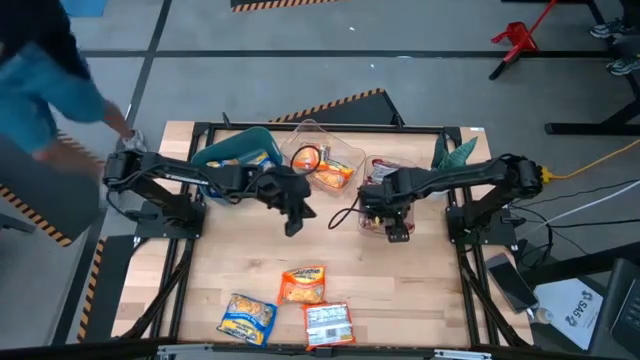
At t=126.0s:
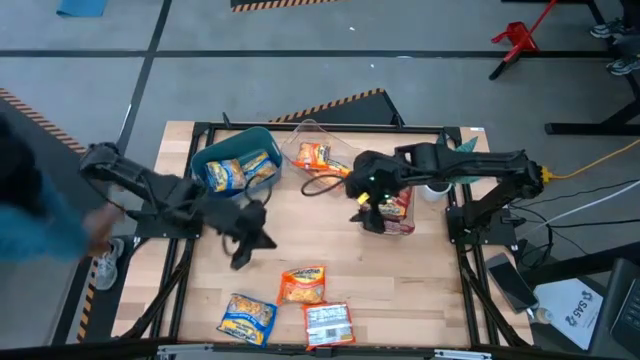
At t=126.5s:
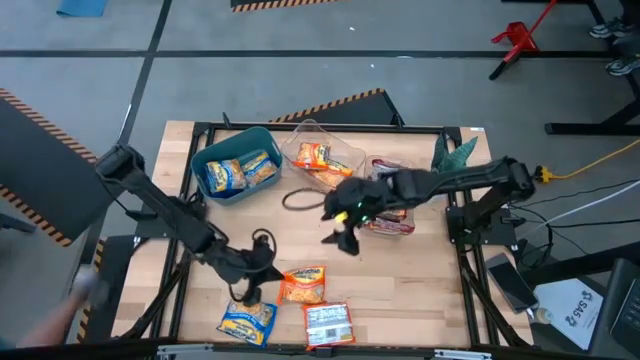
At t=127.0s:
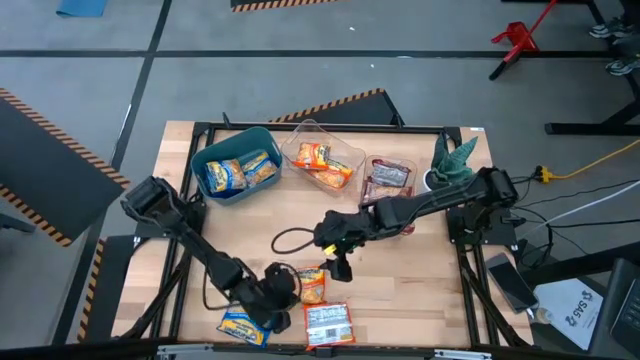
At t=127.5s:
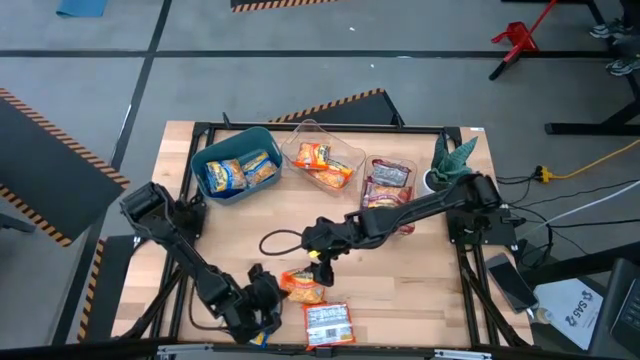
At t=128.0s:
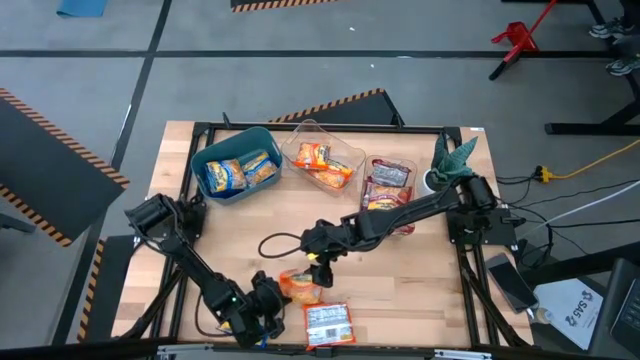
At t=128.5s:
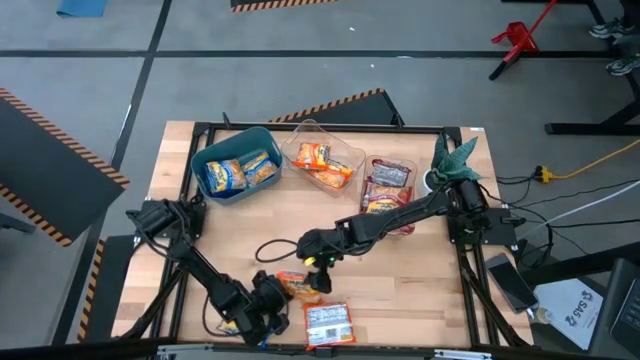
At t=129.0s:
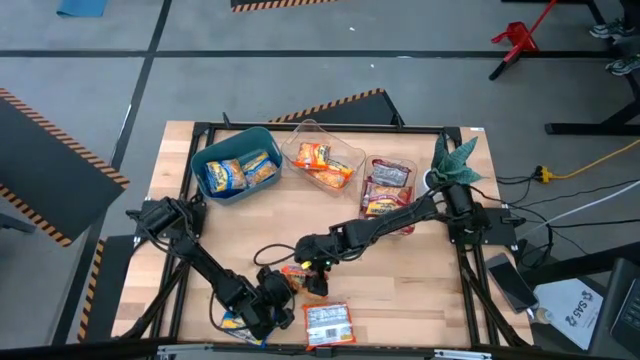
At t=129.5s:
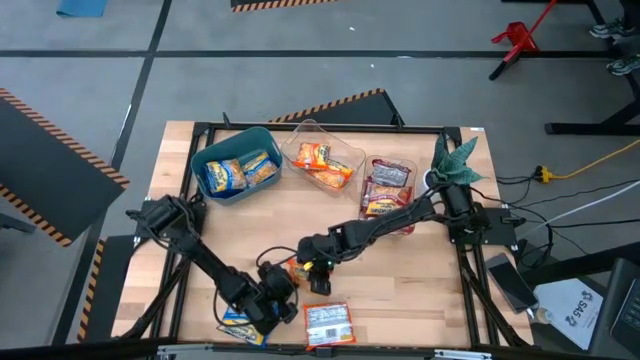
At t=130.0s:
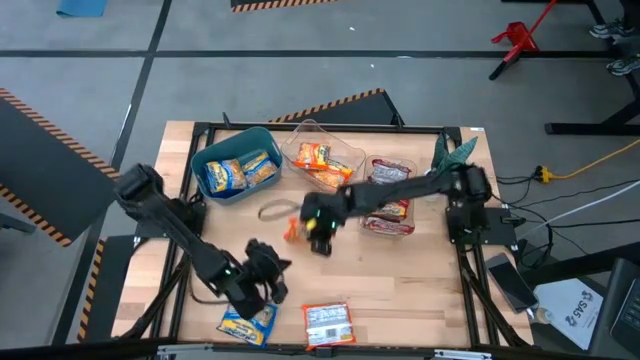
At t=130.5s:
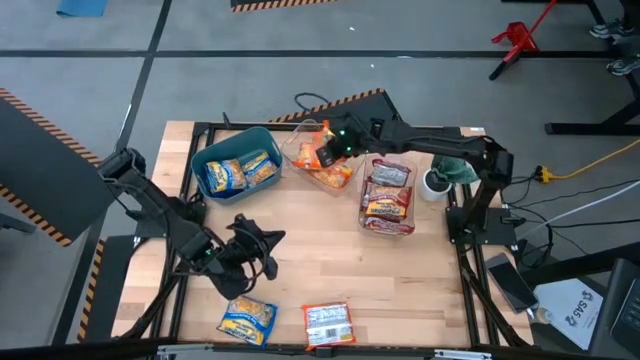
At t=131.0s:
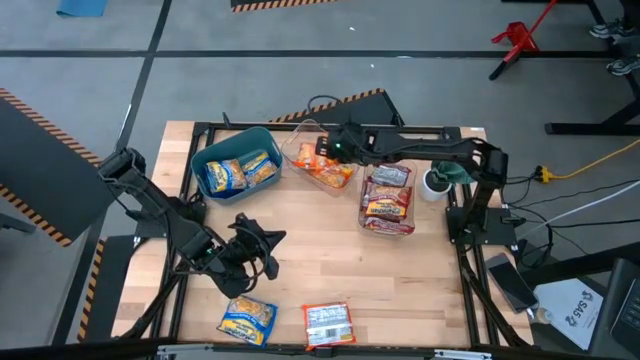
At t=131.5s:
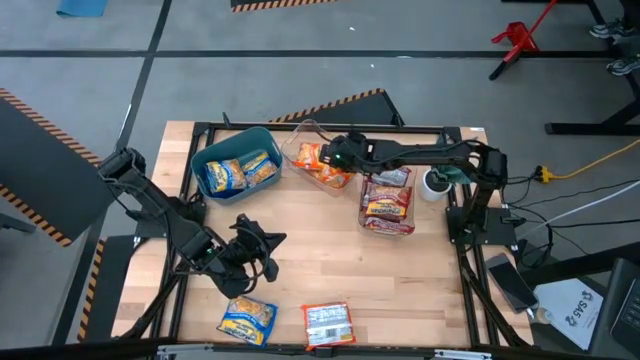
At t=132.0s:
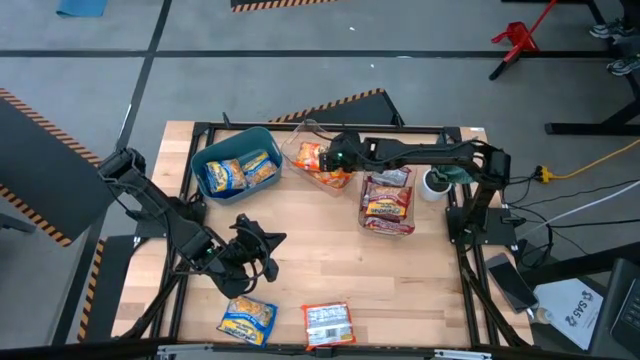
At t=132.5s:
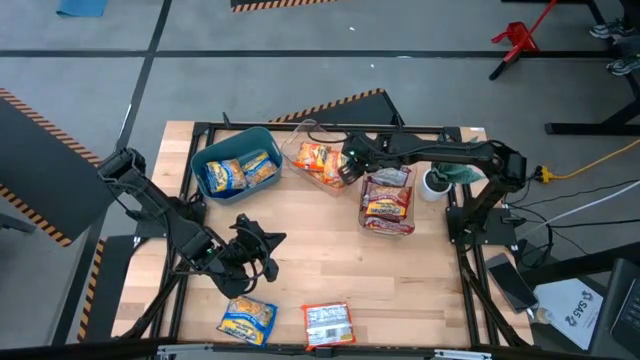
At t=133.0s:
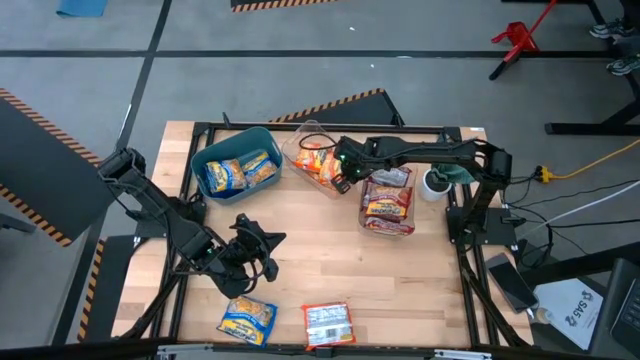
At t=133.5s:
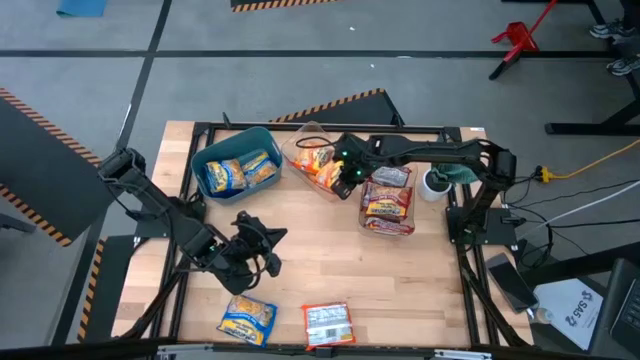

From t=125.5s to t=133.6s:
Task: Sort Maruchan noodles
Put the orange noodle pack into the left transparent bin

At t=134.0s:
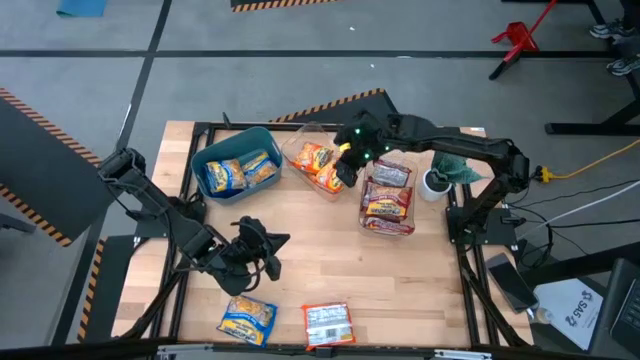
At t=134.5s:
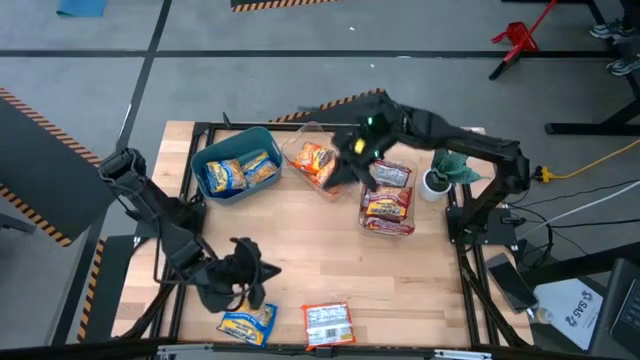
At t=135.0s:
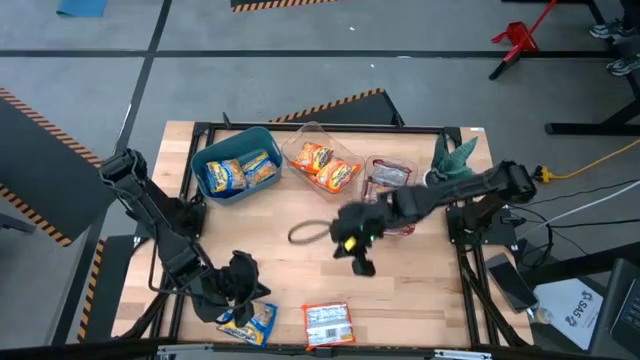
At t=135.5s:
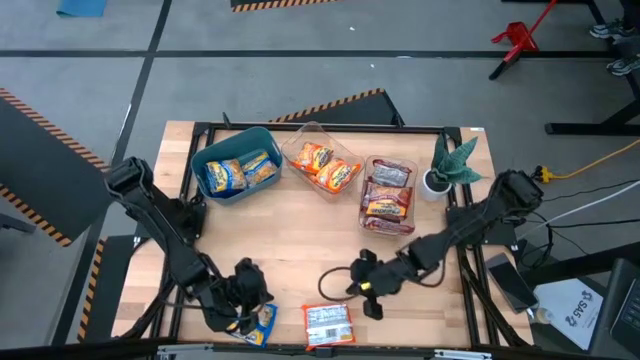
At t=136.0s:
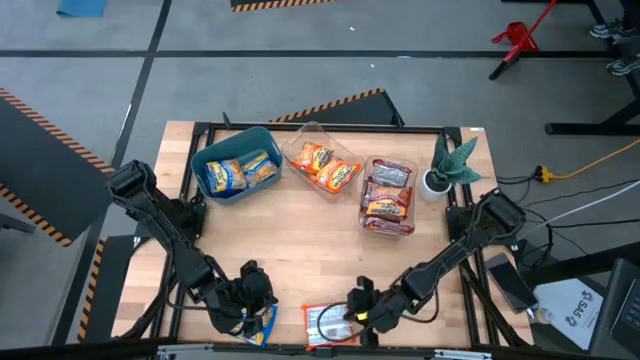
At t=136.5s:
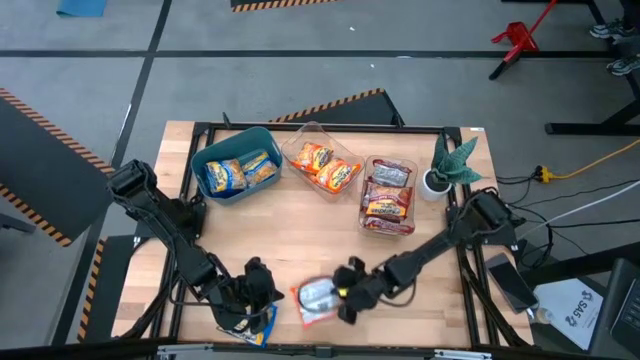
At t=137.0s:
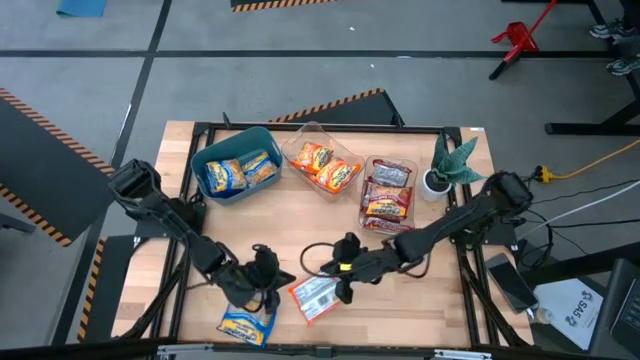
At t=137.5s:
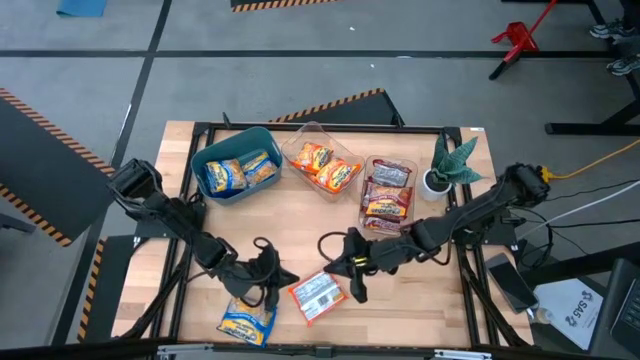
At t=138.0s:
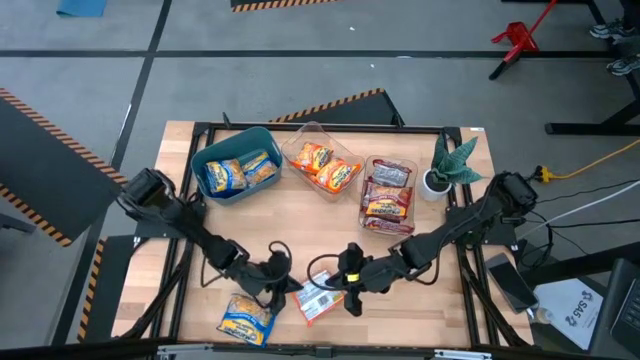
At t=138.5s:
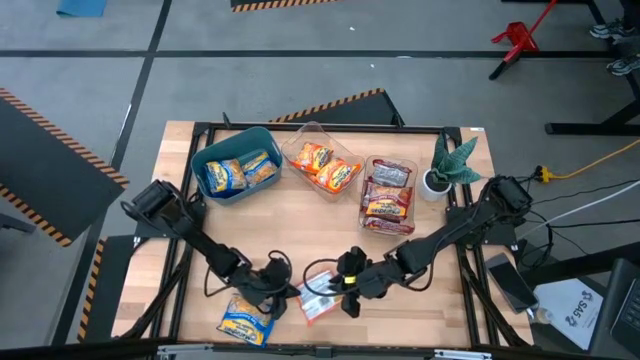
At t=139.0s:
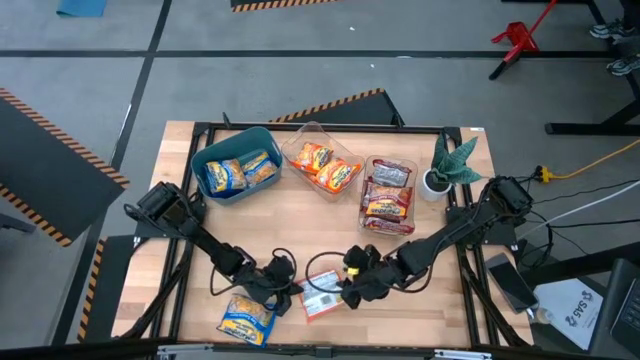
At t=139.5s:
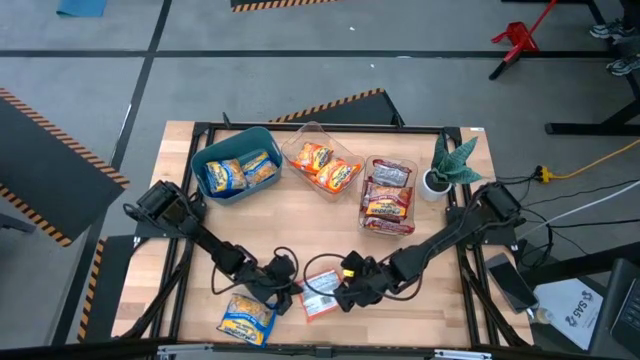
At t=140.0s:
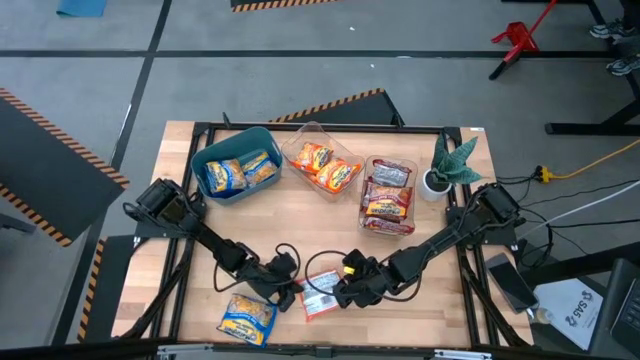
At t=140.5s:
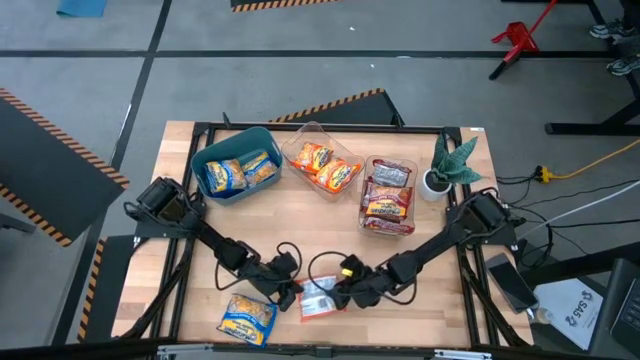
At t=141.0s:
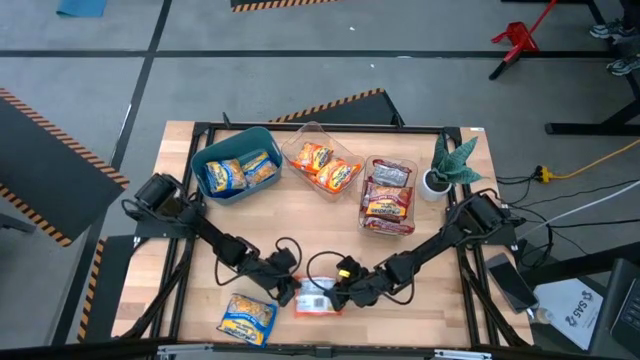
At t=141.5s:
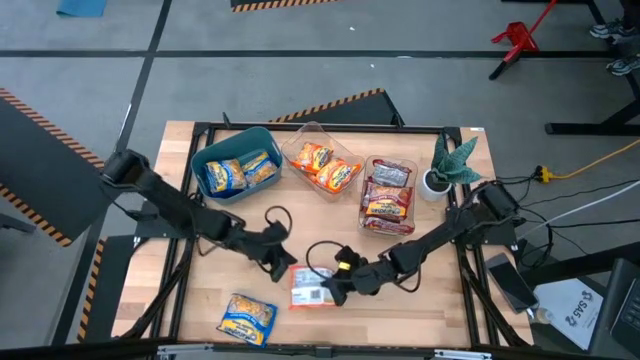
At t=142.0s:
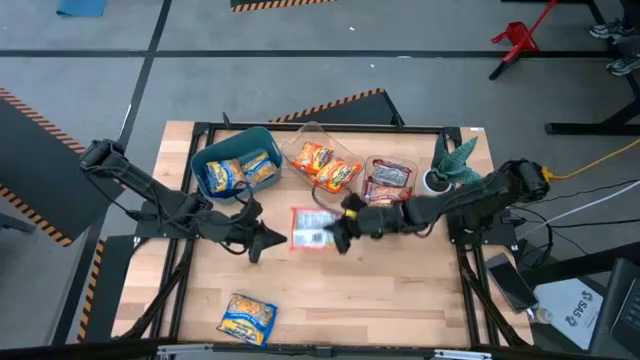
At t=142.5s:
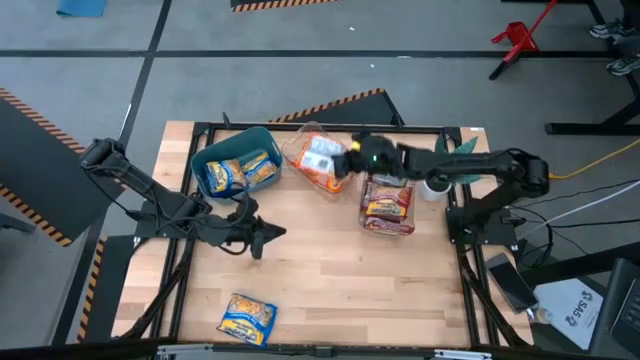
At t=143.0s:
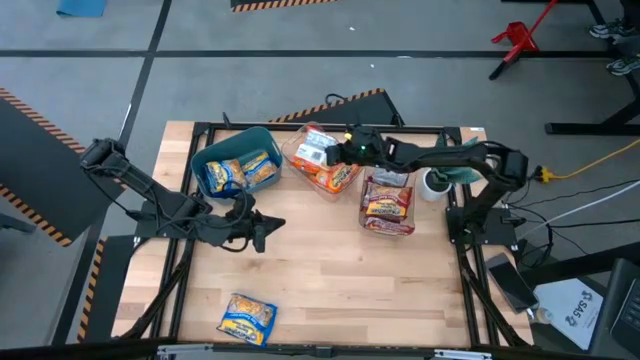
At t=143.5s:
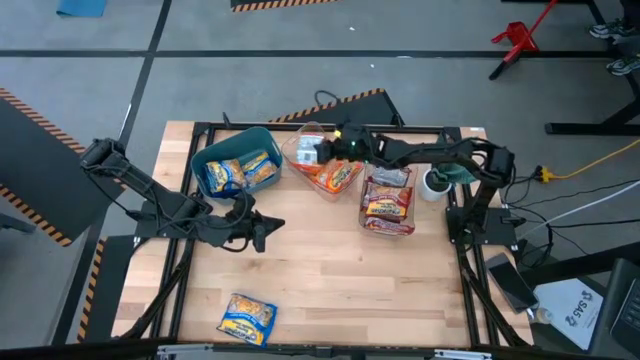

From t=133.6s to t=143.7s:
Put the orange noodle pack into the left transparent bin

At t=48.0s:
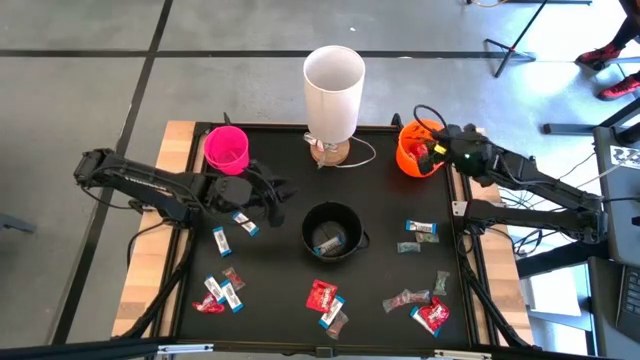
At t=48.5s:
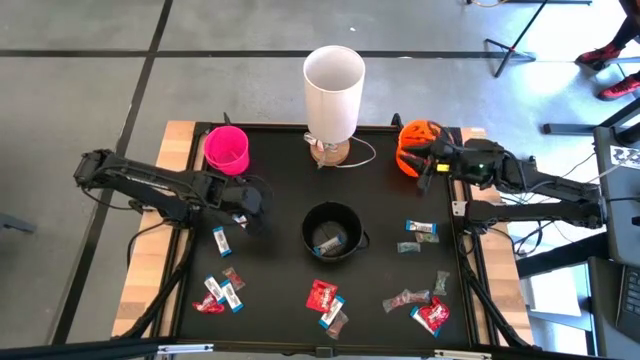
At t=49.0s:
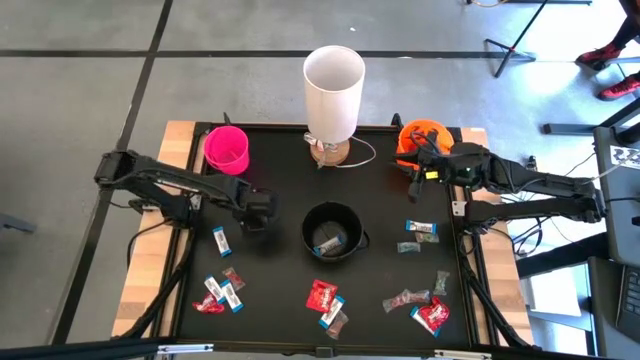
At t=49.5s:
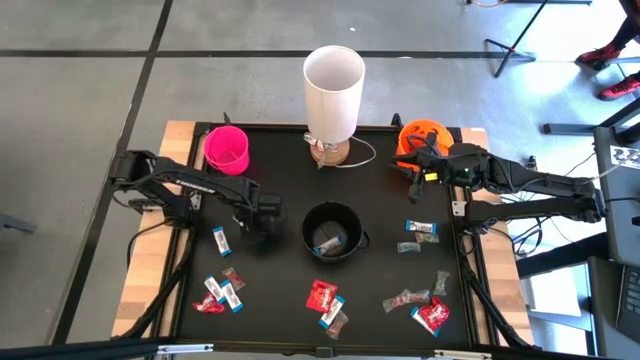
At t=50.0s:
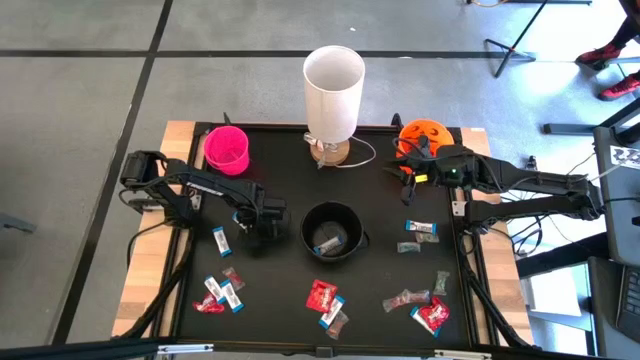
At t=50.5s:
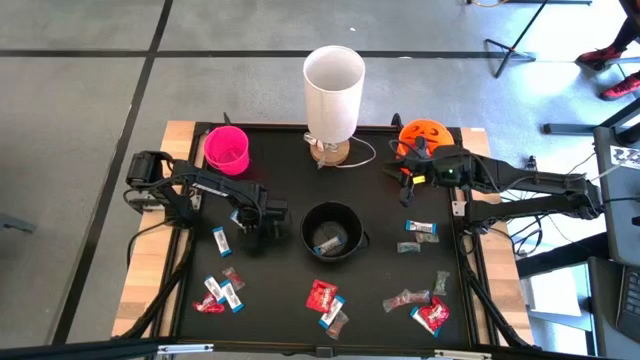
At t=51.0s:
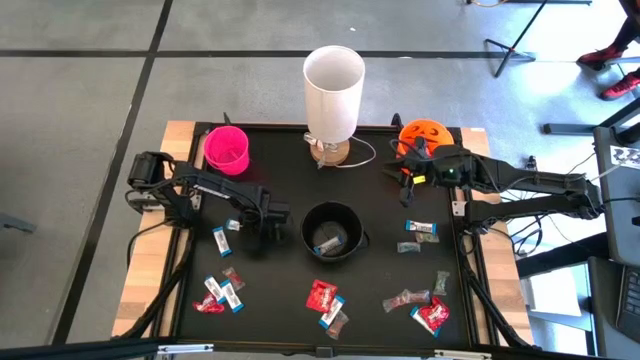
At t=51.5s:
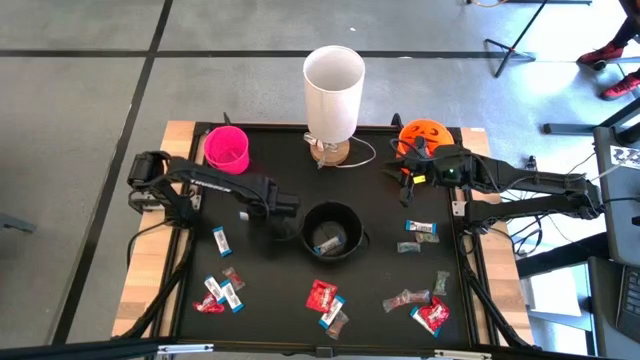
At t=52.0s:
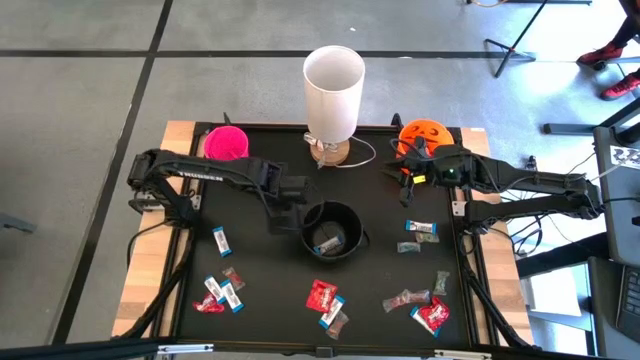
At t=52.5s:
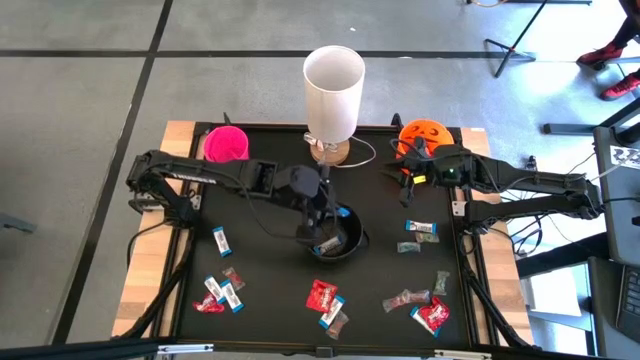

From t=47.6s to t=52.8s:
Task: Sort candy
Put the white chocolate into the black bucket
